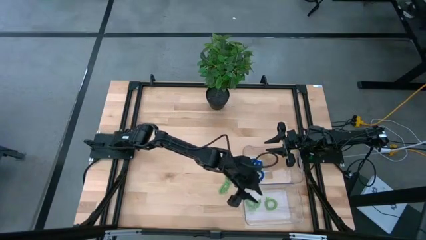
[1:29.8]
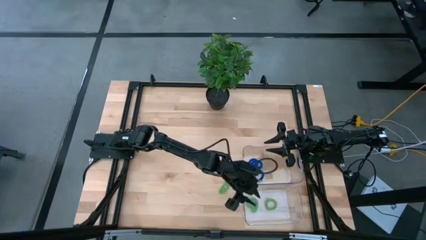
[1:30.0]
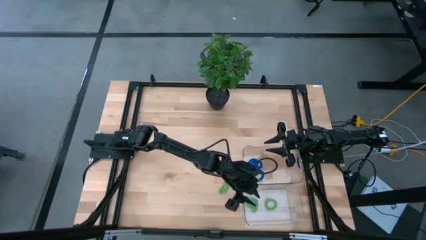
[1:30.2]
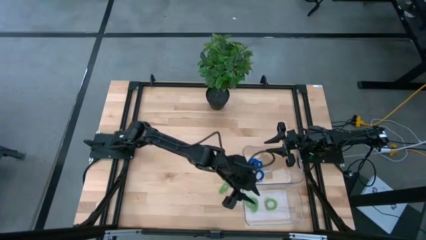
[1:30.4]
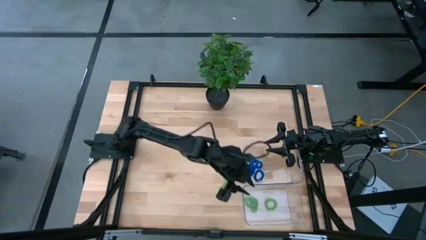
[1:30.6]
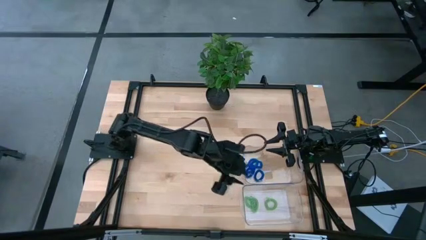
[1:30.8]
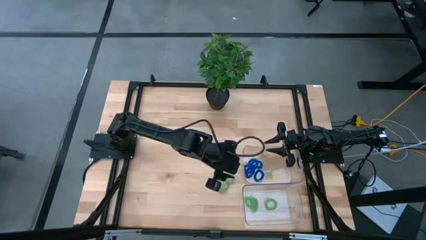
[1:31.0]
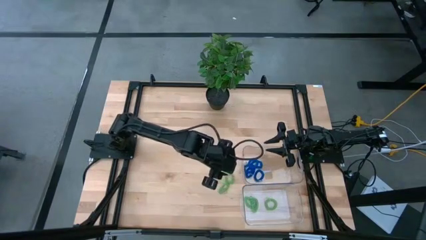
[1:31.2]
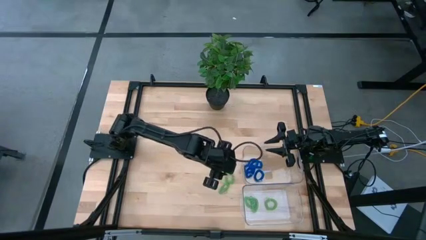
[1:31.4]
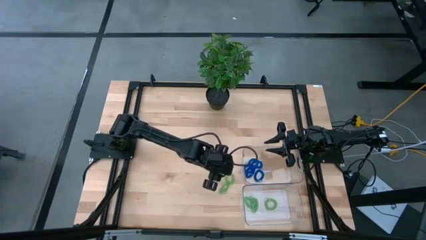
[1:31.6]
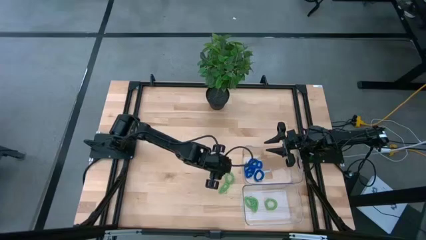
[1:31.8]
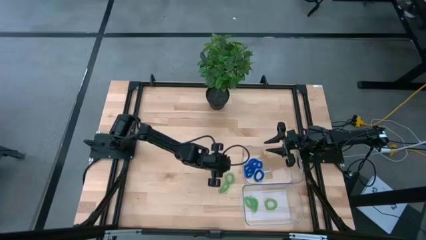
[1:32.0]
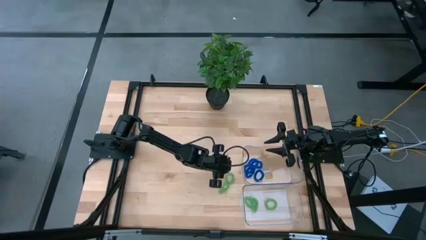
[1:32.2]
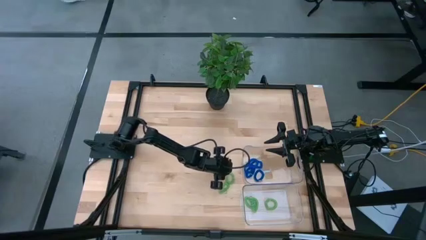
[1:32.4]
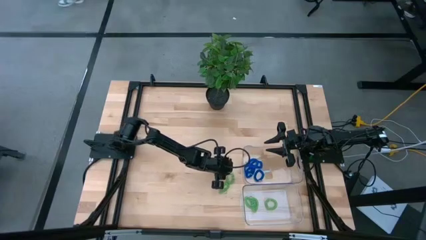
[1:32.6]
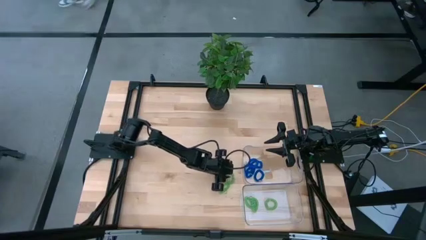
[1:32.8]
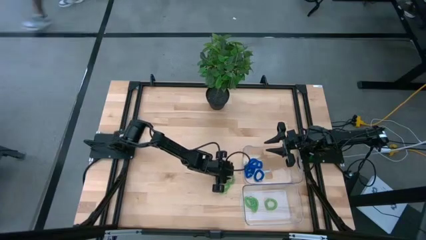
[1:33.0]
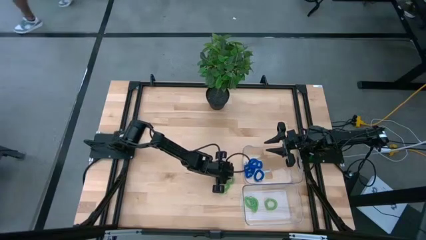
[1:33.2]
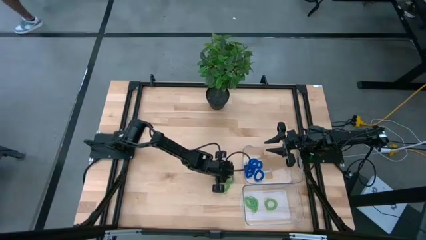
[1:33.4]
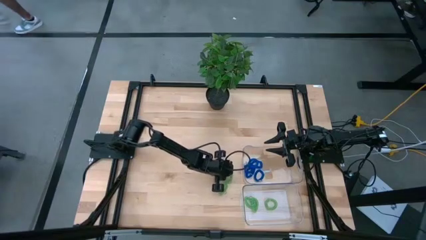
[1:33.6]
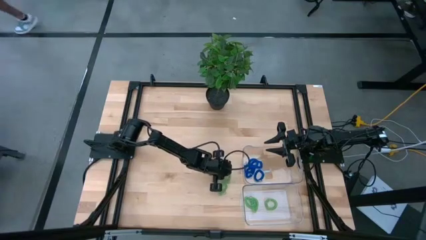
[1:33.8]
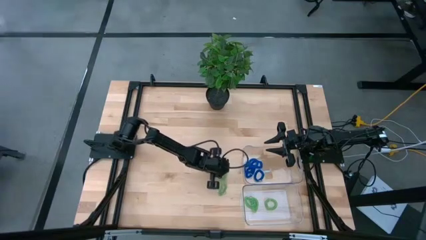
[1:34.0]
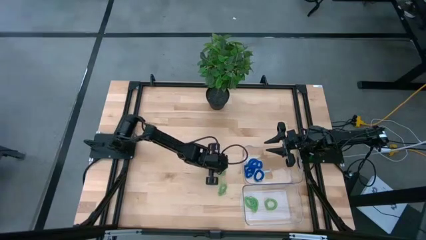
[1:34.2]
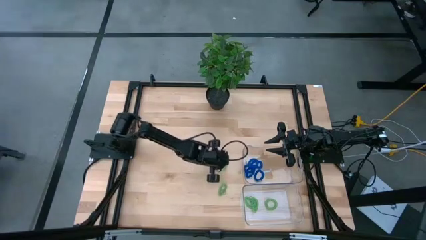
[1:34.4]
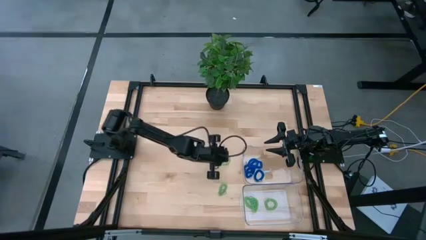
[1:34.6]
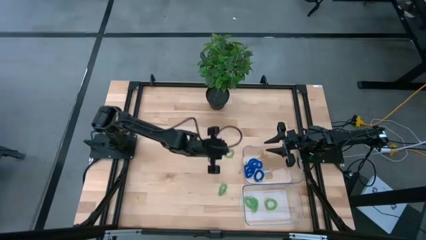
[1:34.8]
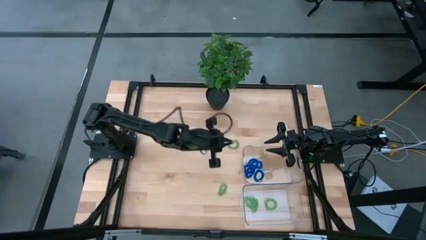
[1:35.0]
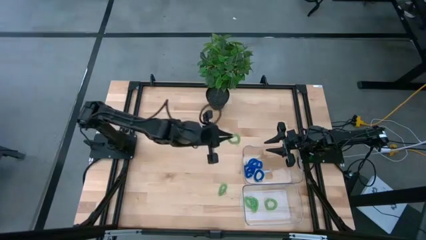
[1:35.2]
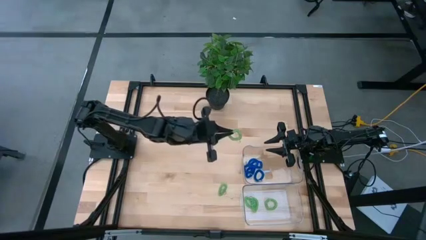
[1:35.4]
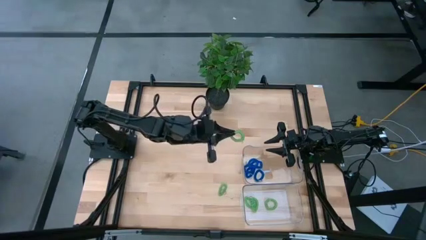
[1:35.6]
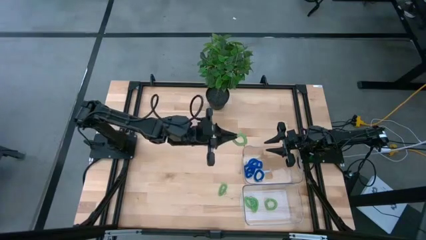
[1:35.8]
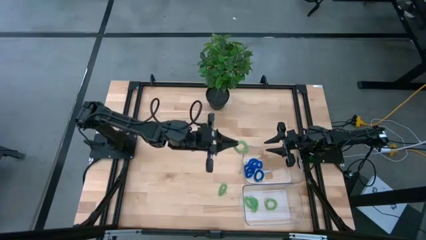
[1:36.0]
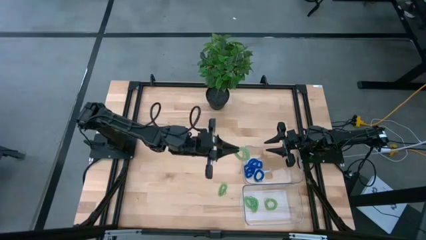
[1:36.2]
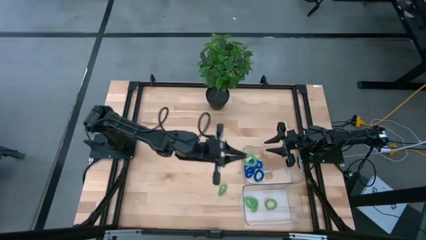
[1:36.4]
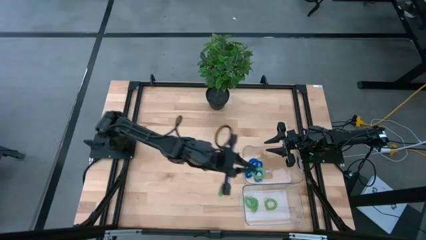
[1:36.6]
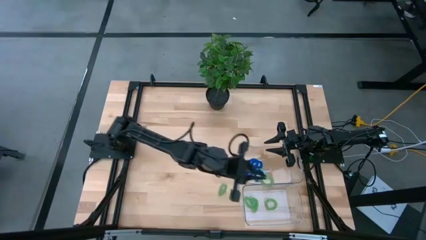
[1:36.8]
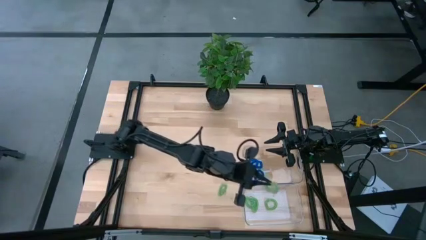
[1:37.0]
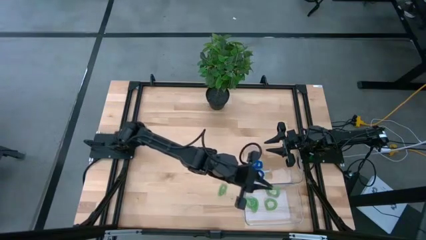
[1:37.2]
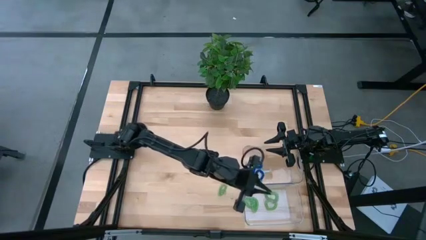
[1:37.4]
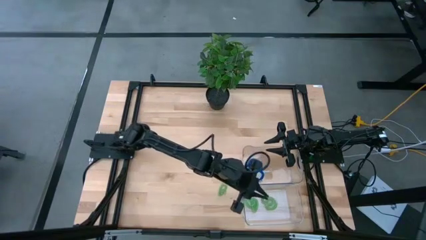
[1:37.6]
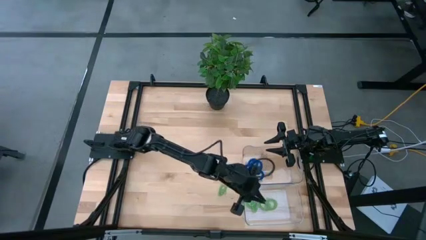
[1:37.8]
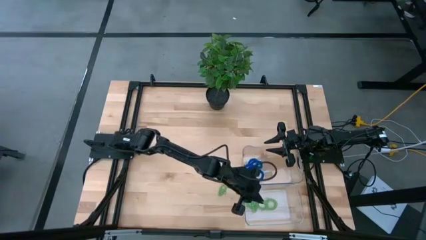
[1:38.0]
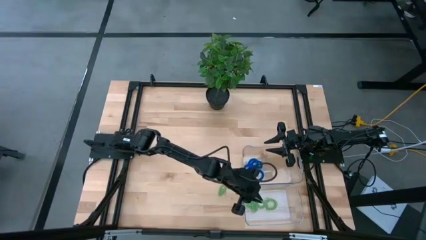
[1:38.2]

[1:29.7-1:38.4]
Task: Sort spring keychains
Put the green spring keychain in the bottom transparent bin

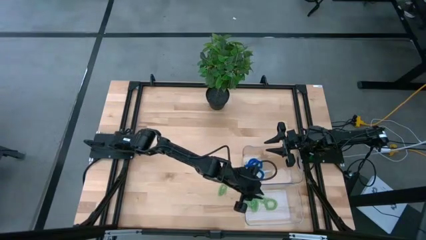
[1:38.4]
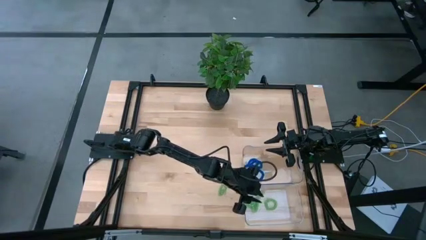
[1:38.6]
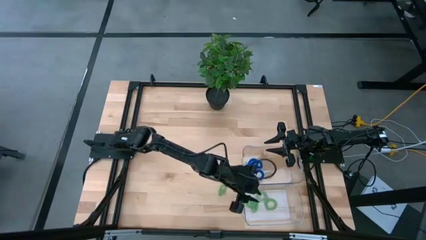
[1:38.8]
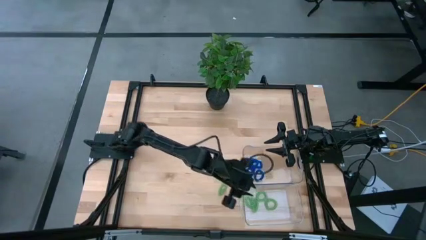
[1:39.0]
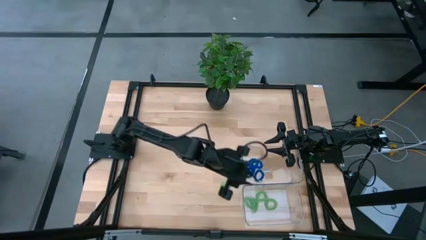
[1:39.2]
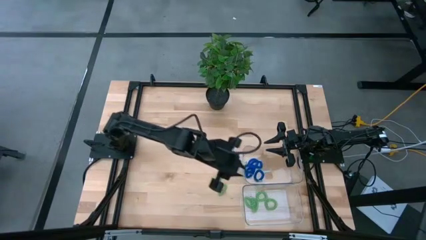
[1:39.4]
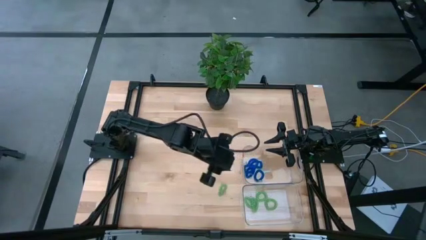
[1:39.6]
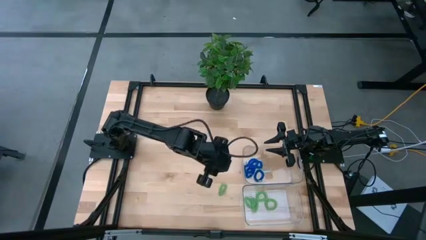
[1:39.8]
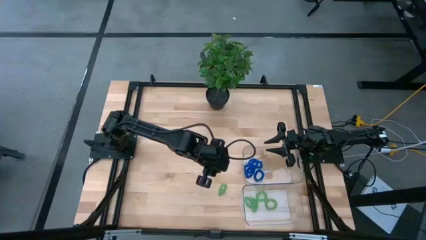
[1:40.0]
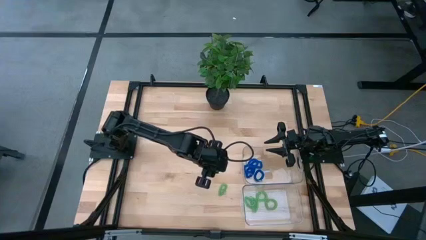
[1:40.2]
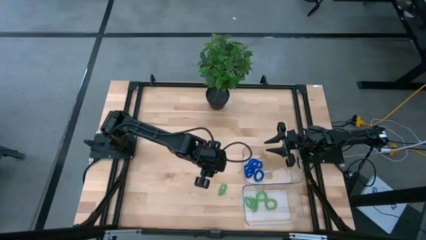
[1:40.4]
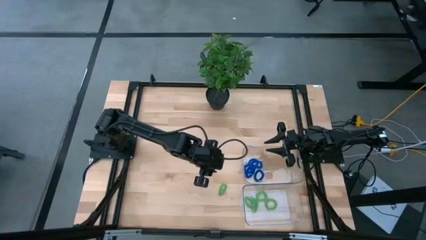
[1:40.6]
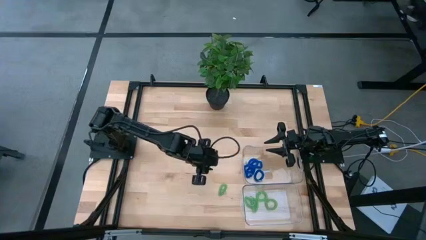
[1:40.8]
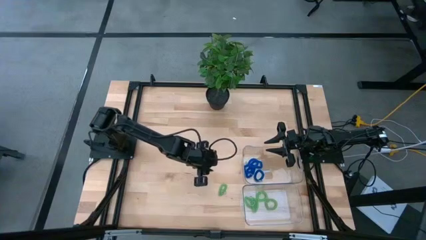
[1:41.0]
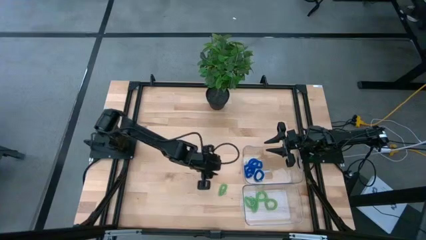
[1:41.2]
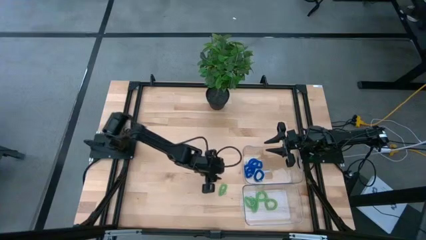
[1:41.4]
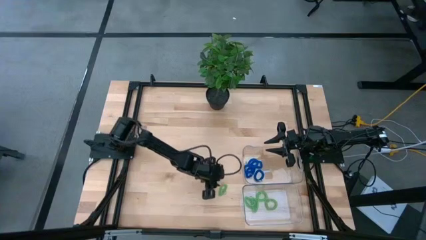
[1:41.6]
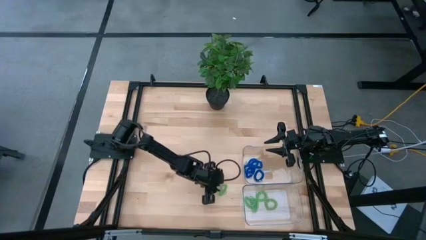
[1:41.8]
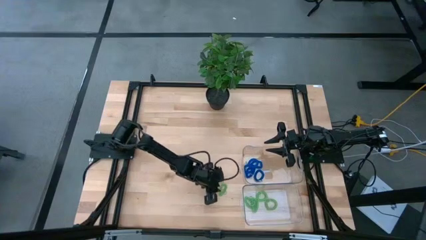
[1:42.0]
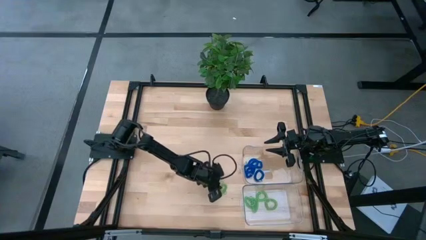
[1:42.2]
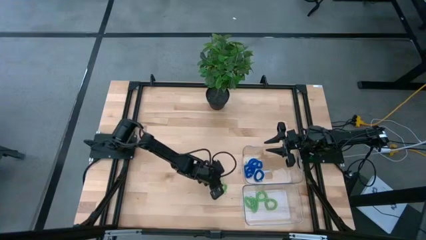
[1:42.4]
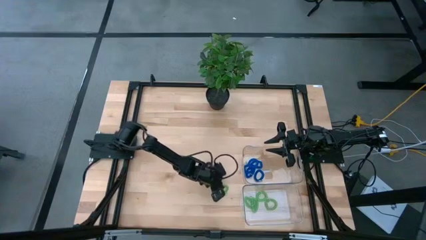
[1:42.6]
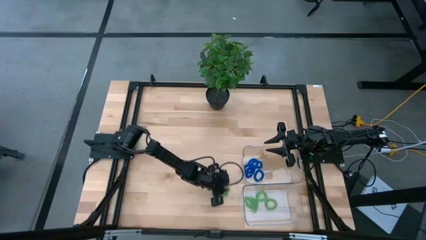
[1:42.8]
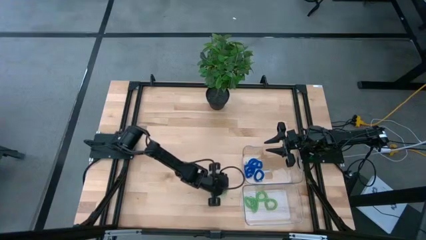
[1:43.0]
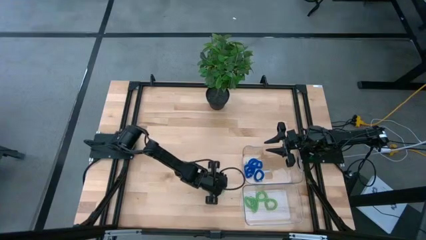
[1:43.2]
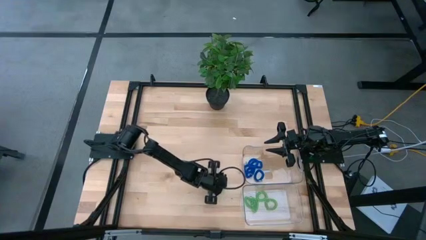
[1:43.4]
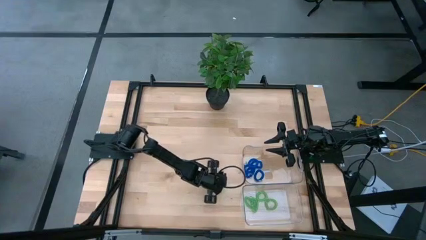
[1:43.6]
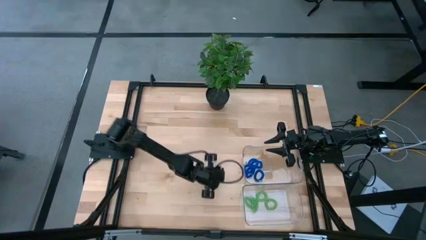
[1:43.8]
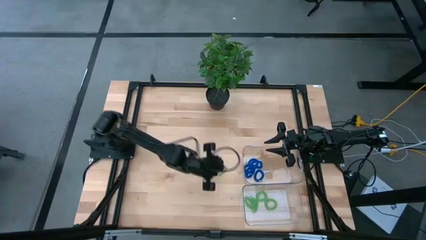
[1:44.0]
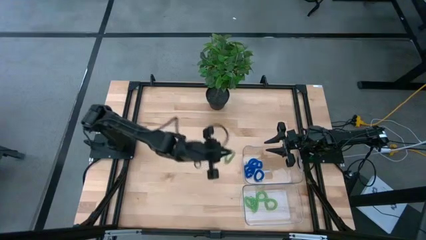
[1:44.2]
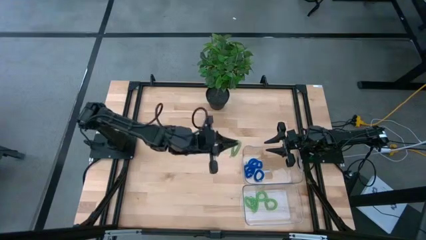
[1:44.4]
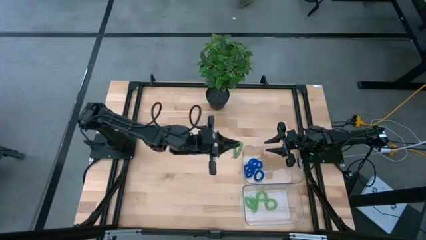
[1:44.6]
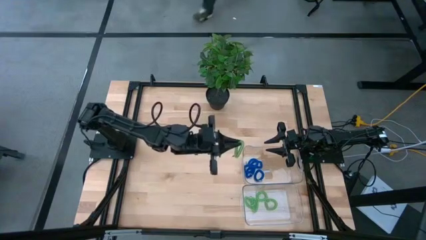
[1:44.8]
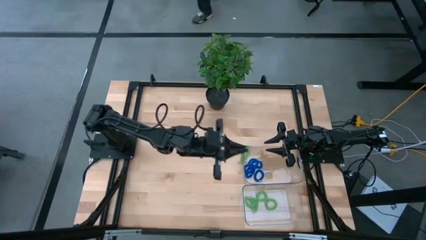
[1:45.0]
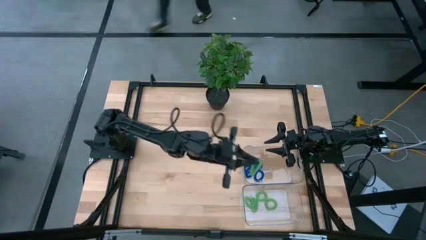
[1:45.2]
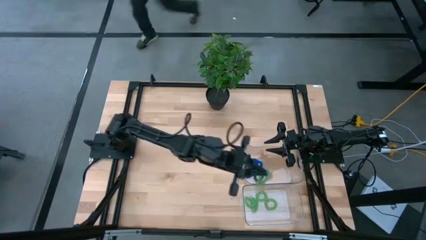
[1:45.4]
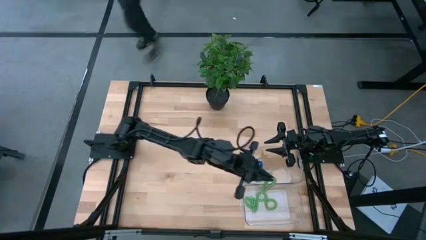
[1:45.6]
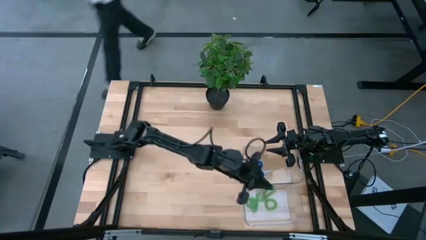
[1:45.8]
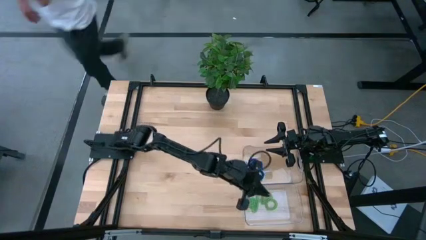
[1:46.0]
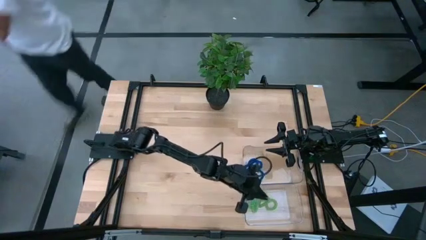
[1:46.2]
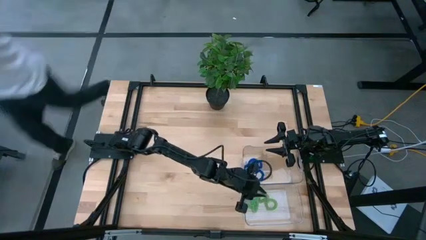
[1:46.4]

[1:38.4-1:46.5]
Put the green spring keychain in the bottom transparent bin
